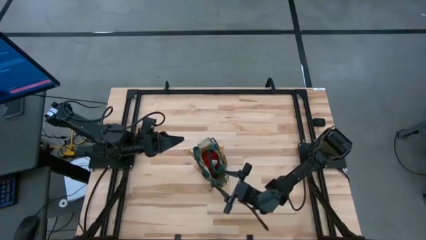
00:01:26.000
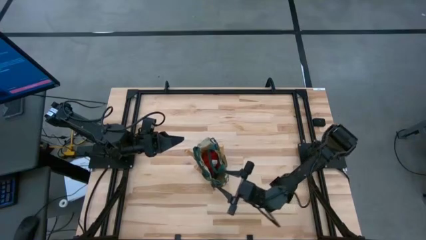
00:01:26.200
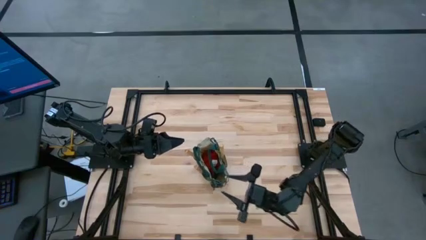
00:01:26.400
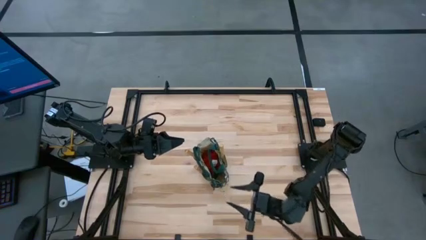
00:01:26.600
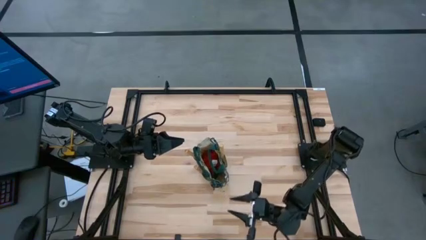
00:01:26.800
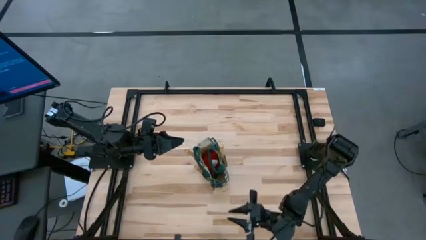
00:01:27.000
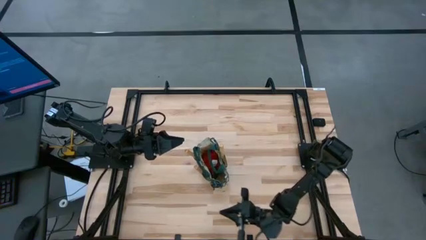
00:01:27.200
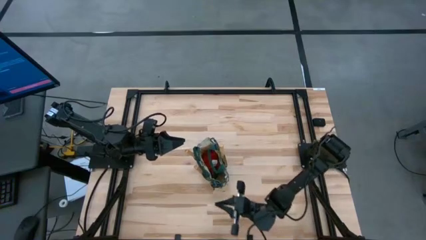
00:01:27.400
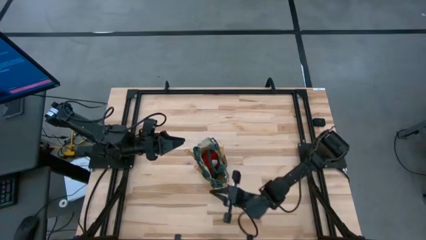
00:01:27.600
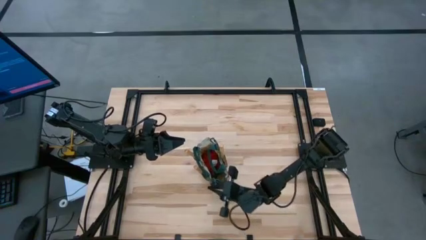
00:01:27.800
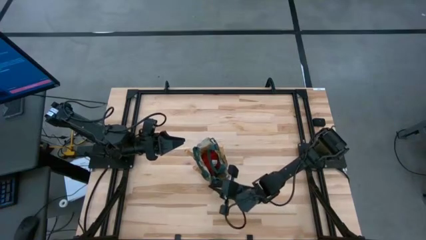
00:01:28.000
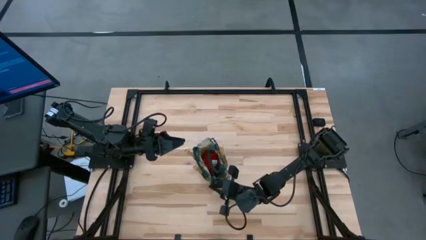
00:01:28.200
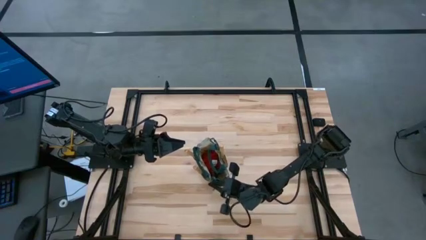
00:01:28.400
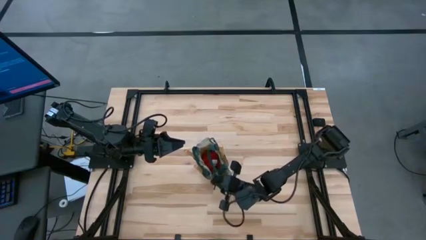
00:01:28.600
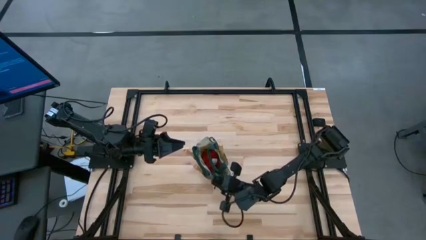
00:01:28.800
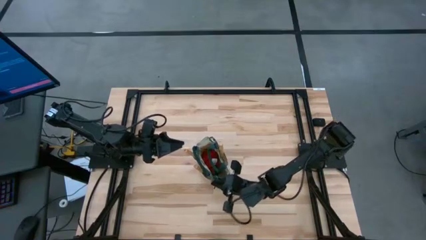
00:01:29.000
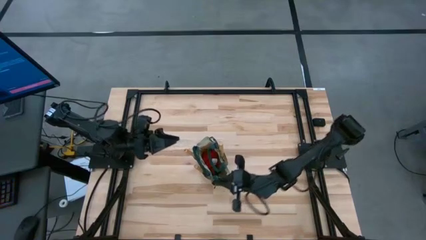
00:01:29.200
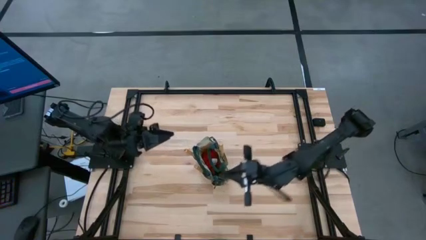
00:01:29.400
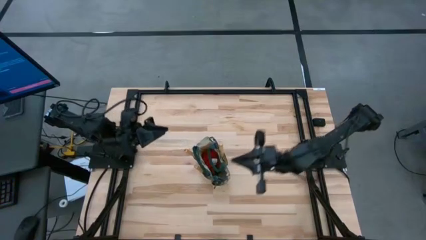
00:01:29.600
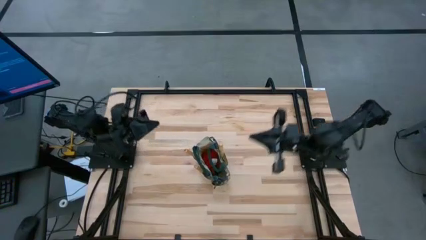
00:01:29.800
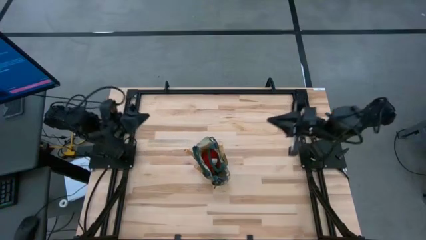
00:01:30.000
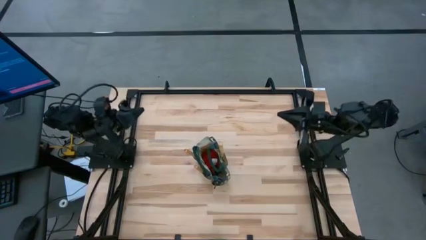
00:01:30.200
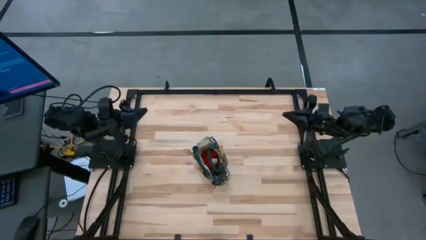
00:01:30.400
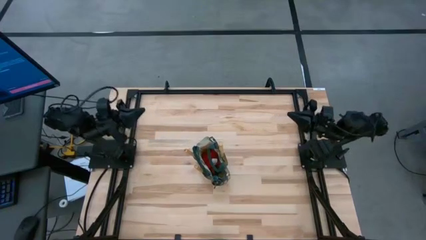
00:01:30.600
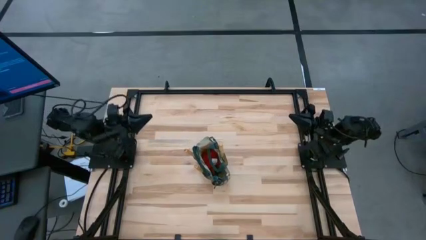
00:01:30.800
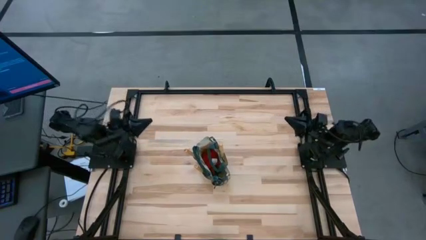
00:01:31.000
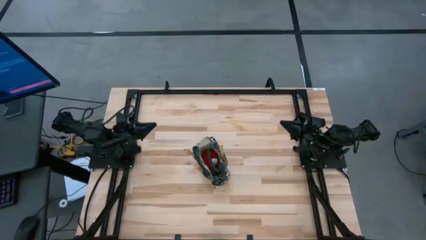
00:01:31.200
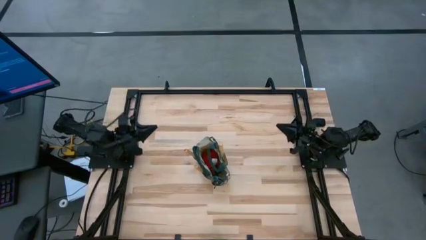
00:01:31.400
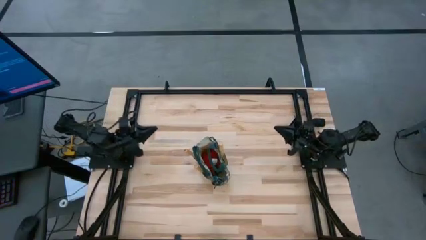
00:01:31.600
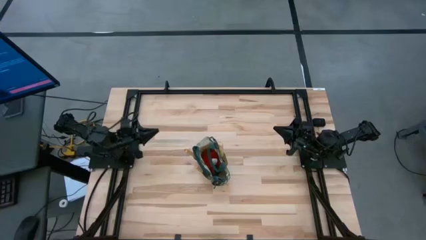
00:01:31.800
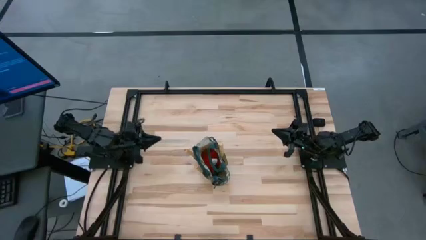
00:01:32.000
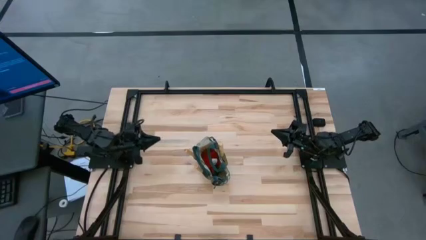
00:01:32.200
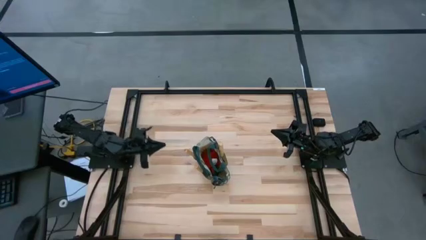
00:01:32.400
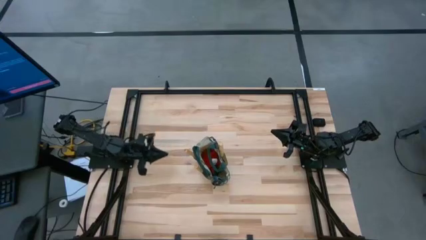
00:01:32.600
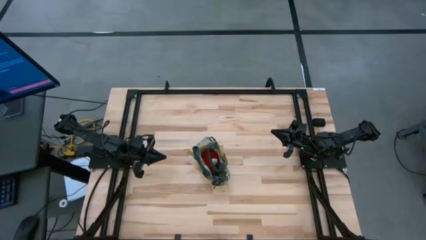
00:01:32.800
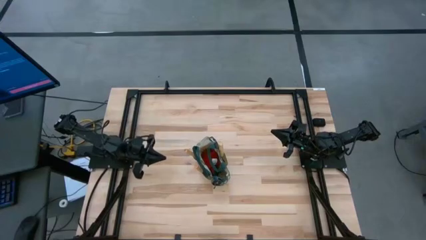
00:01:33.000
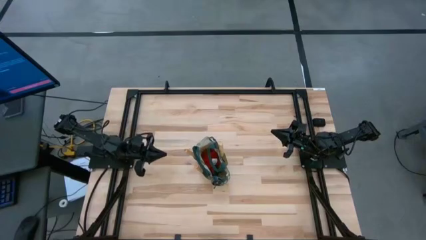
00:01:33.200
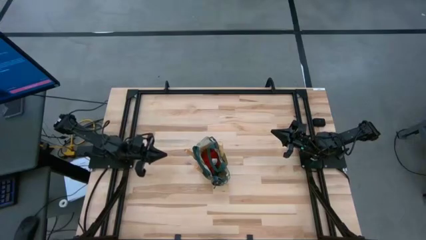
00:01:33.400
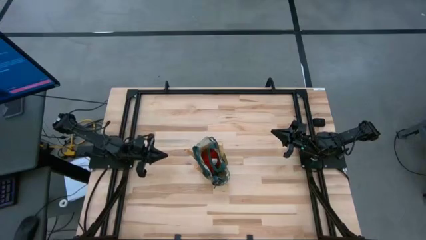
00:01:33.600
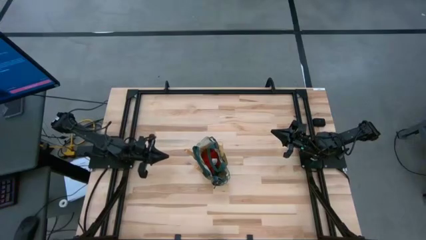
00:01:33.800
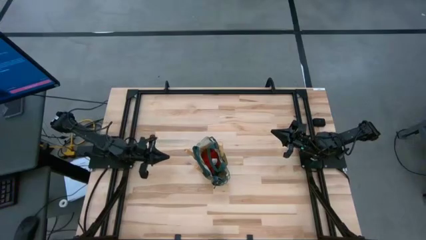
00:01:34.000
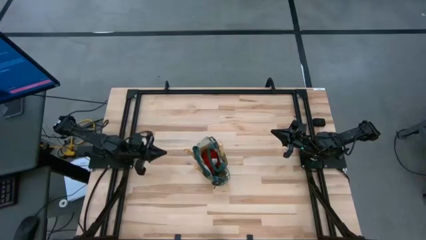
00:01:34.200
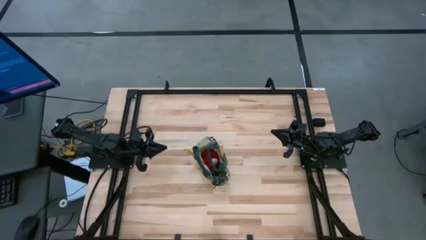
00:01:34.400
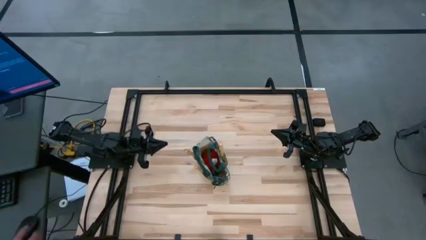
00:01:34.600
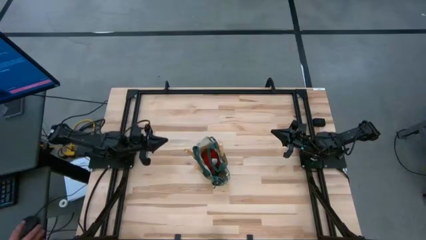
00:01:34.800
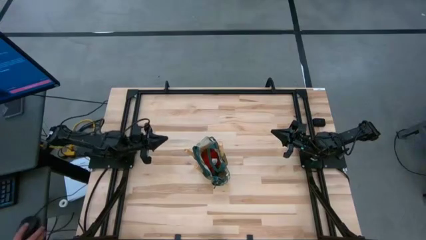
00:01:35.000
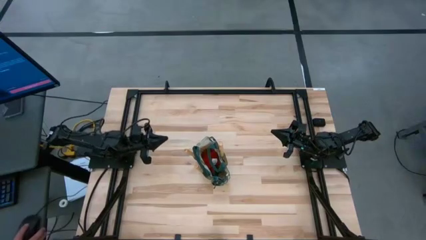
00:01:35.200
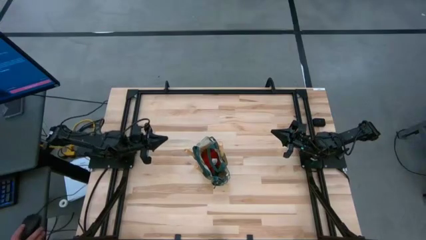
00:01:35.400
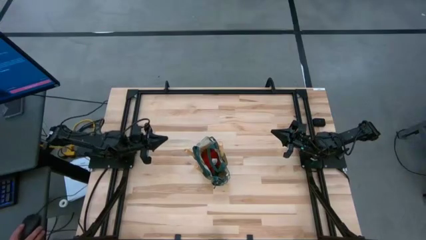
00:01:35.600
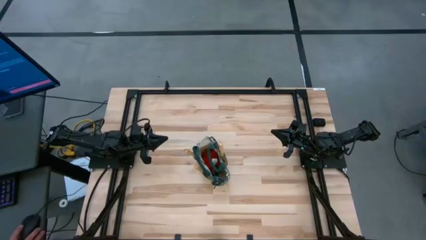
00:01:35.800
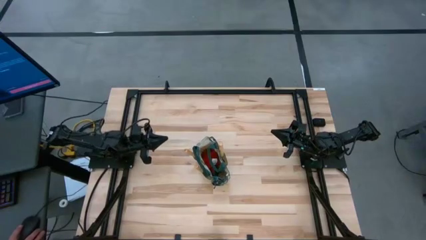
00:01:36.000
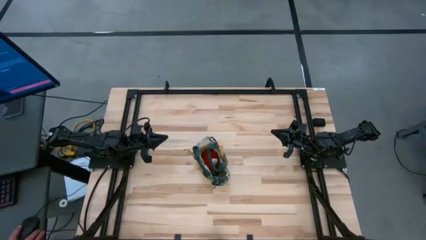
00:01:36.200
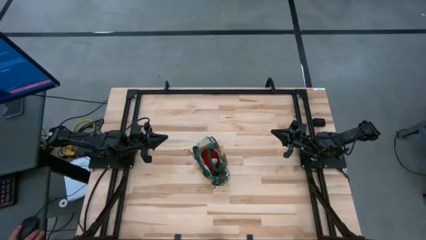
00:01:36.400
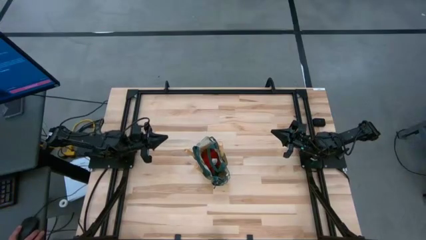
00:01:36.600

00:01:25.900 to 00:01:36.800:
Task: Pick & Place Garden tools in Gardening bag
Return to Home Position
